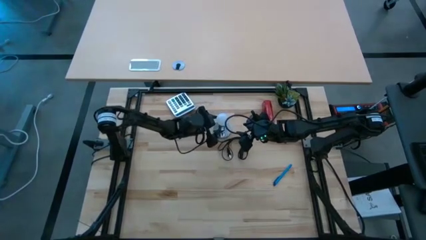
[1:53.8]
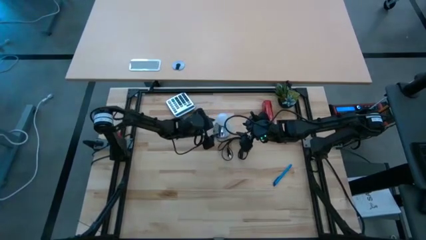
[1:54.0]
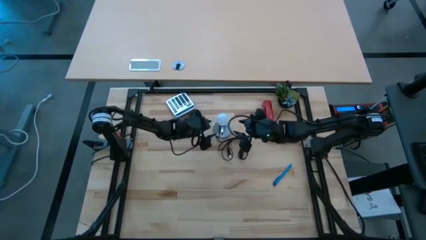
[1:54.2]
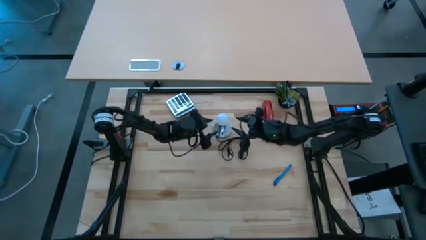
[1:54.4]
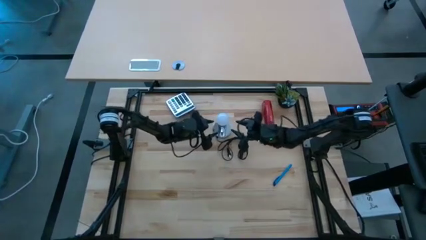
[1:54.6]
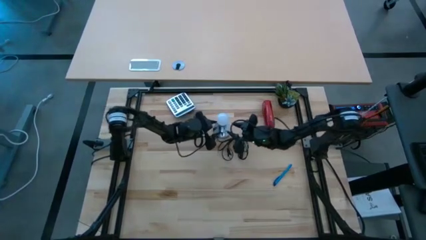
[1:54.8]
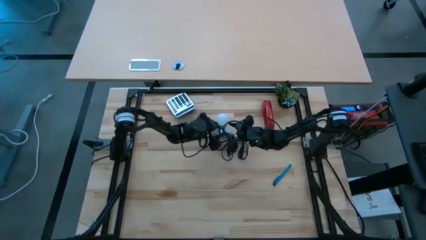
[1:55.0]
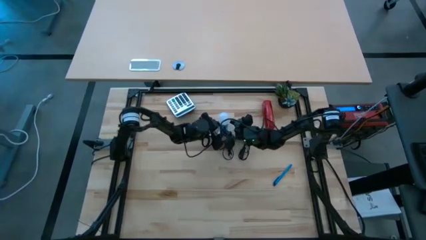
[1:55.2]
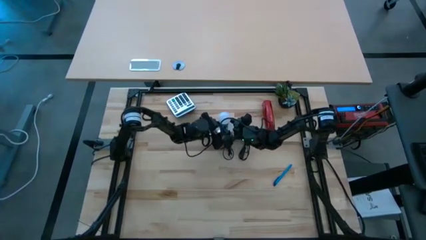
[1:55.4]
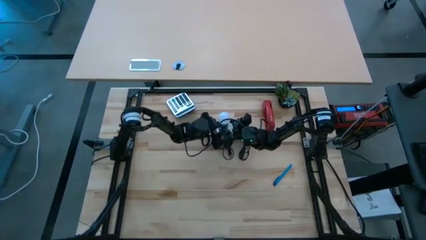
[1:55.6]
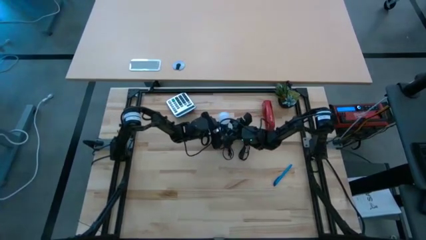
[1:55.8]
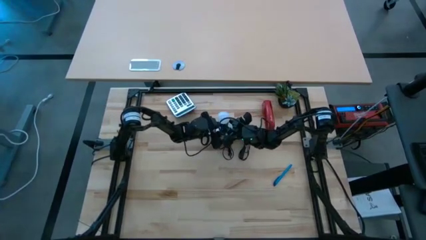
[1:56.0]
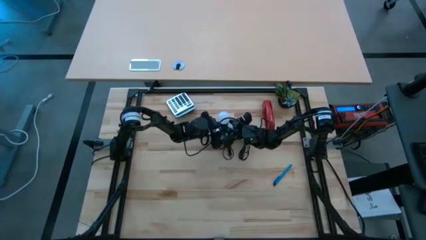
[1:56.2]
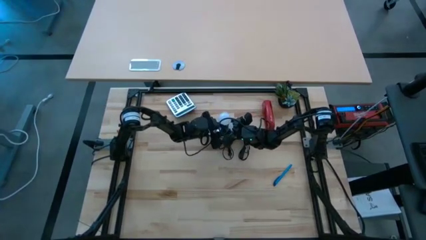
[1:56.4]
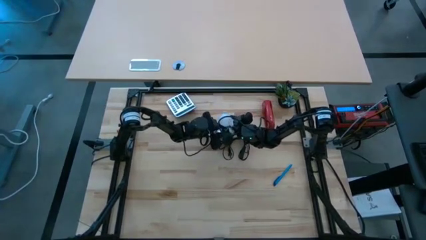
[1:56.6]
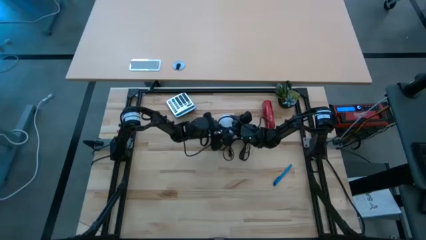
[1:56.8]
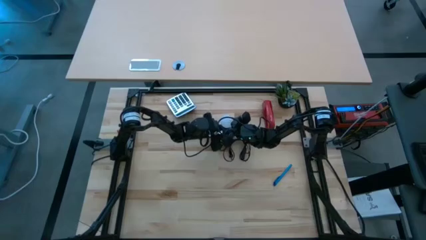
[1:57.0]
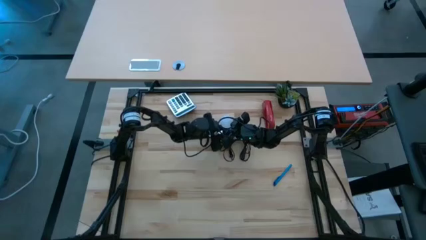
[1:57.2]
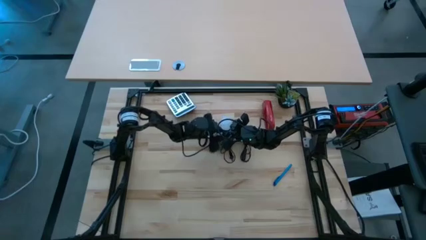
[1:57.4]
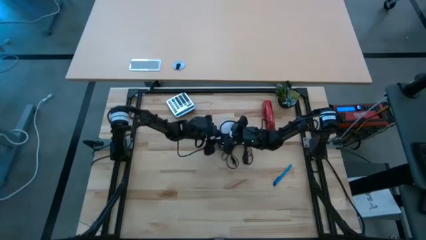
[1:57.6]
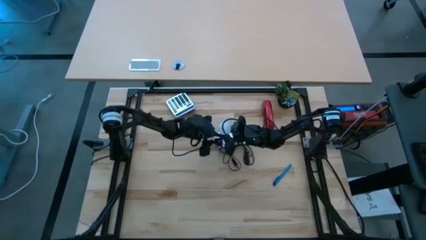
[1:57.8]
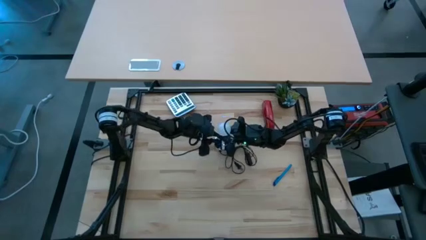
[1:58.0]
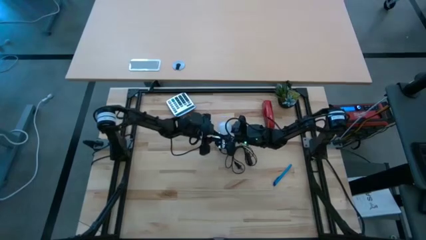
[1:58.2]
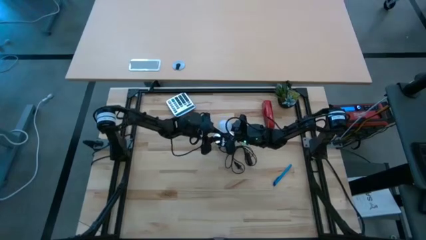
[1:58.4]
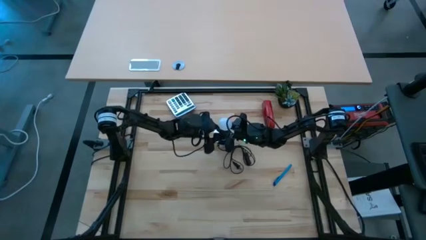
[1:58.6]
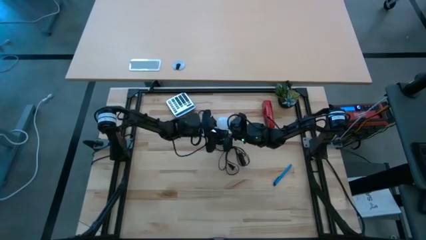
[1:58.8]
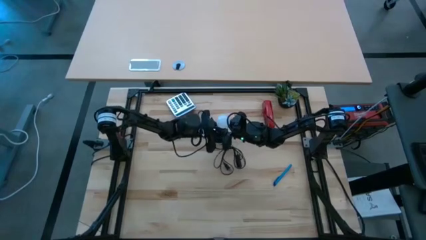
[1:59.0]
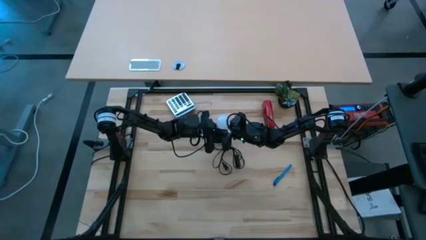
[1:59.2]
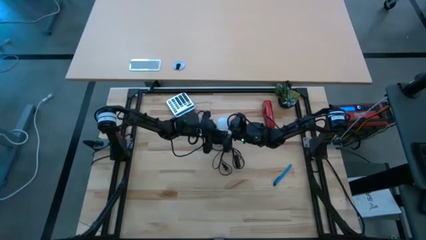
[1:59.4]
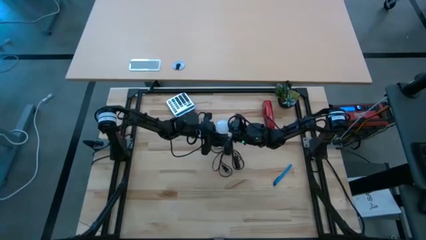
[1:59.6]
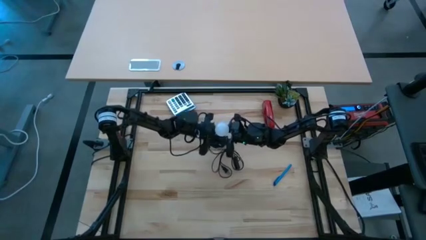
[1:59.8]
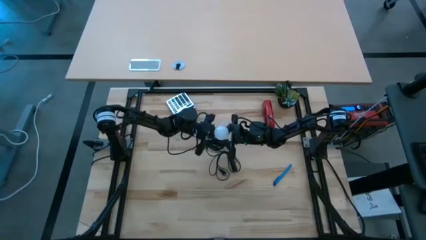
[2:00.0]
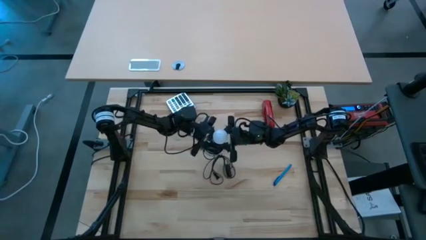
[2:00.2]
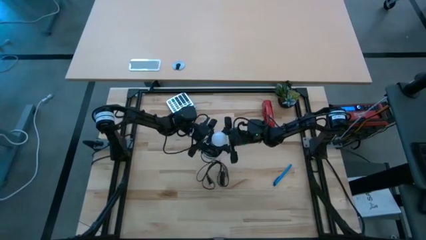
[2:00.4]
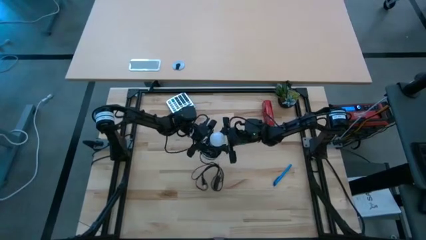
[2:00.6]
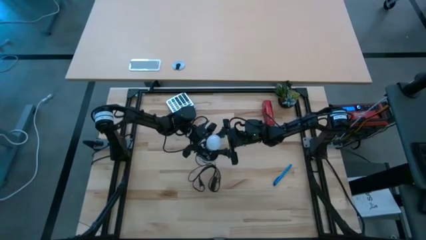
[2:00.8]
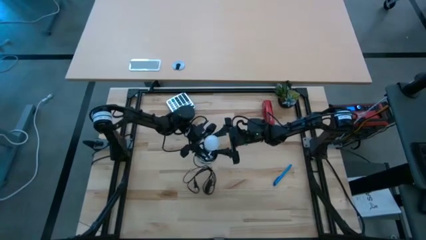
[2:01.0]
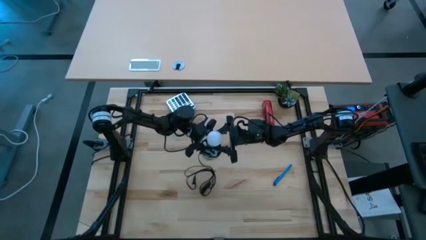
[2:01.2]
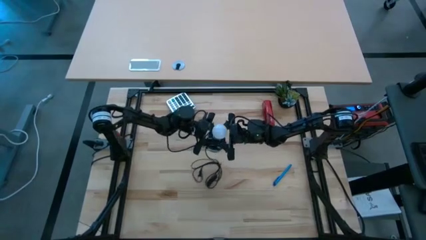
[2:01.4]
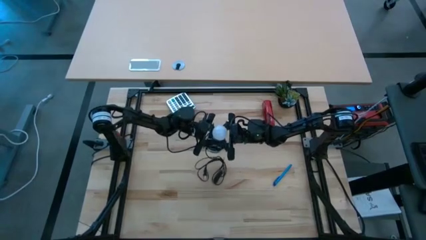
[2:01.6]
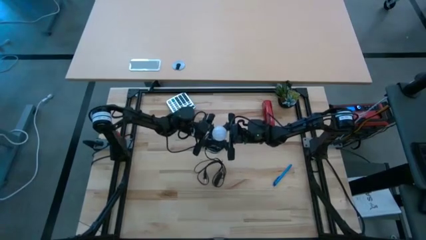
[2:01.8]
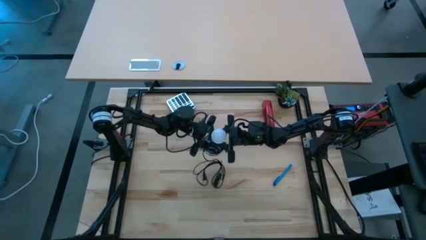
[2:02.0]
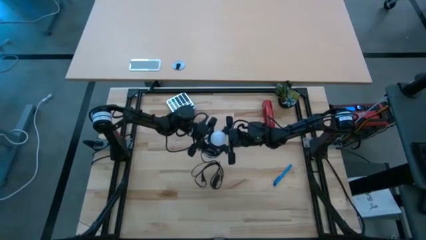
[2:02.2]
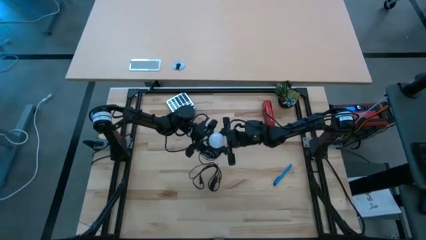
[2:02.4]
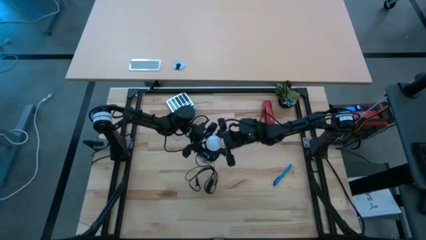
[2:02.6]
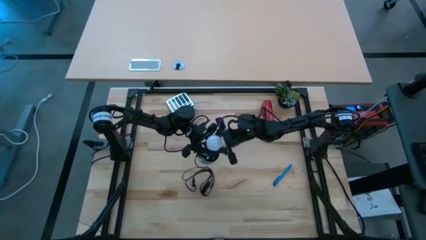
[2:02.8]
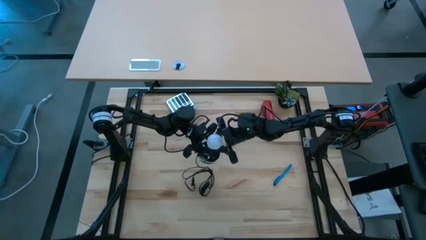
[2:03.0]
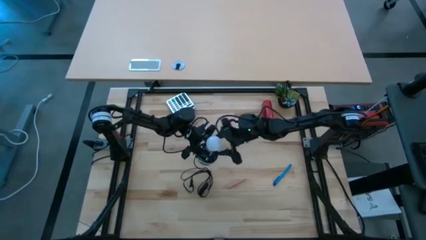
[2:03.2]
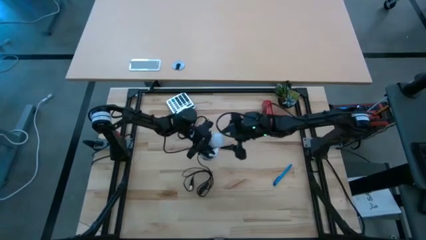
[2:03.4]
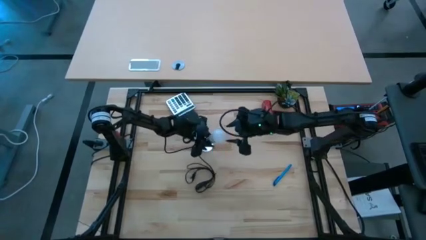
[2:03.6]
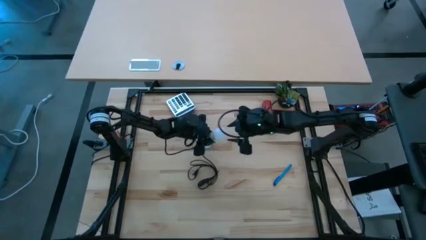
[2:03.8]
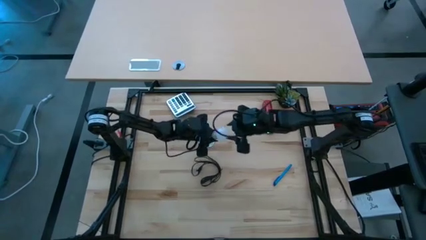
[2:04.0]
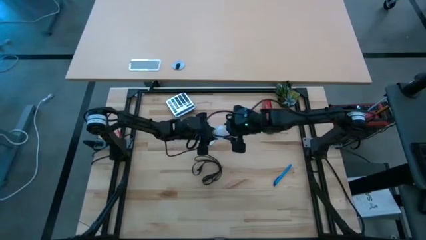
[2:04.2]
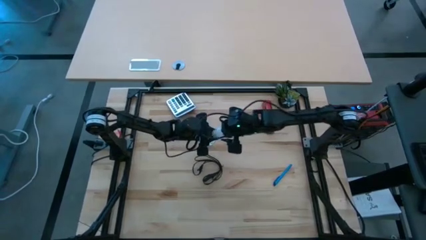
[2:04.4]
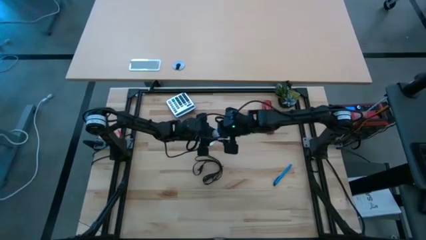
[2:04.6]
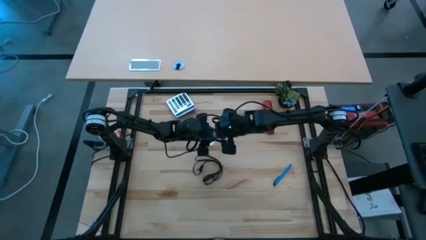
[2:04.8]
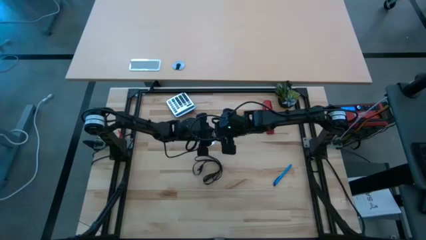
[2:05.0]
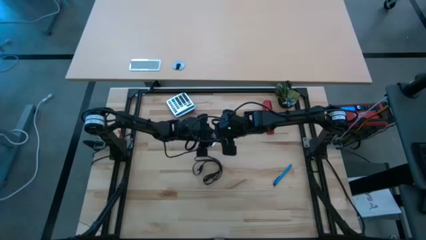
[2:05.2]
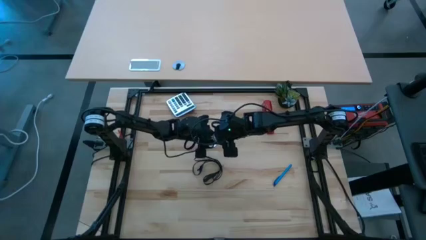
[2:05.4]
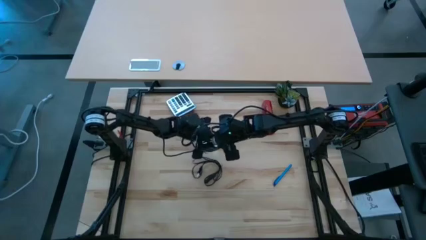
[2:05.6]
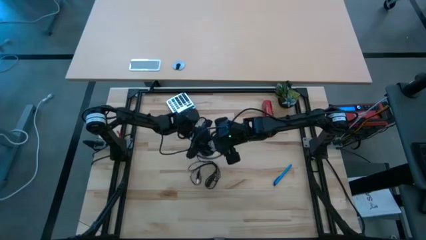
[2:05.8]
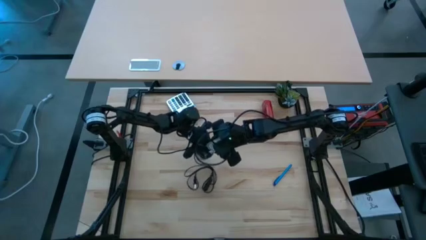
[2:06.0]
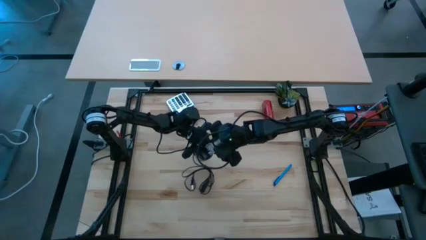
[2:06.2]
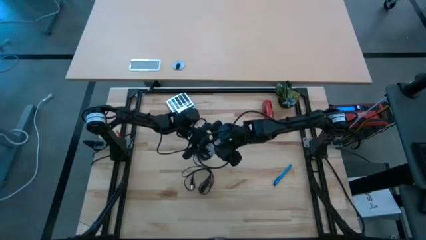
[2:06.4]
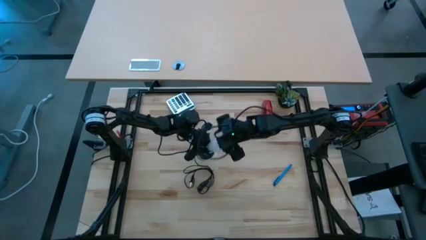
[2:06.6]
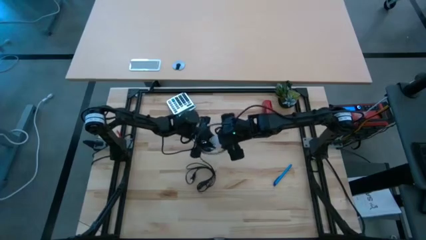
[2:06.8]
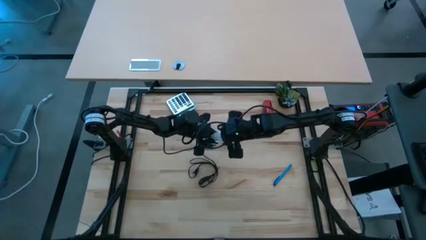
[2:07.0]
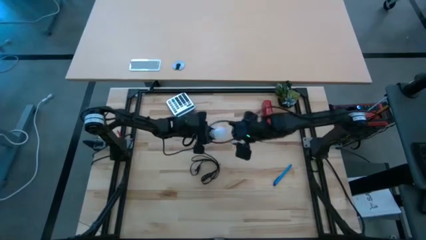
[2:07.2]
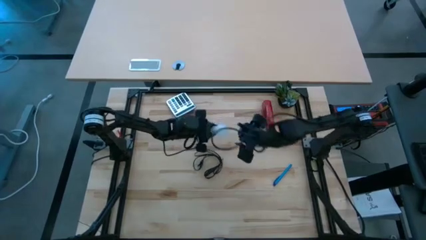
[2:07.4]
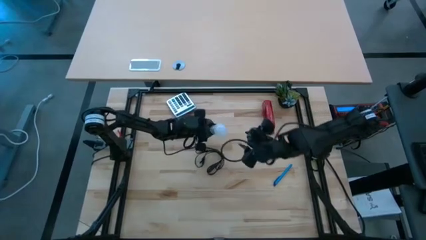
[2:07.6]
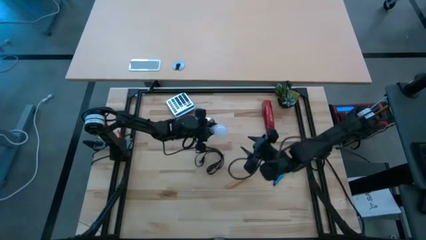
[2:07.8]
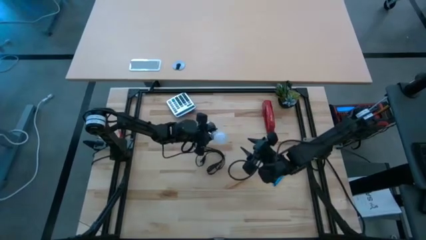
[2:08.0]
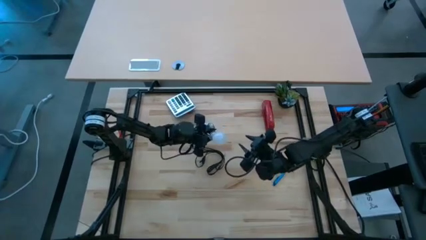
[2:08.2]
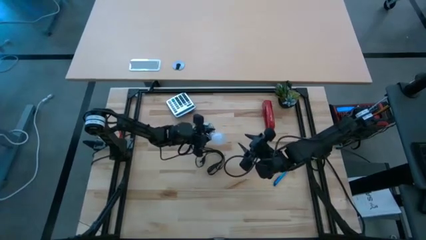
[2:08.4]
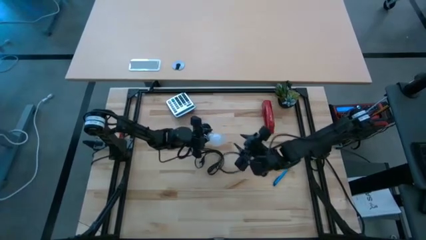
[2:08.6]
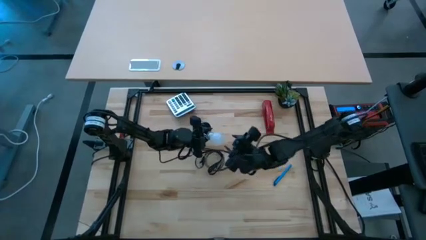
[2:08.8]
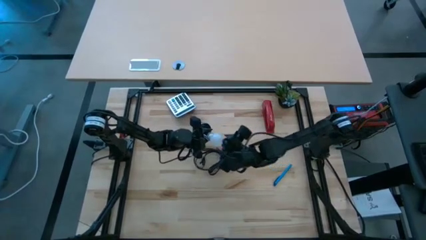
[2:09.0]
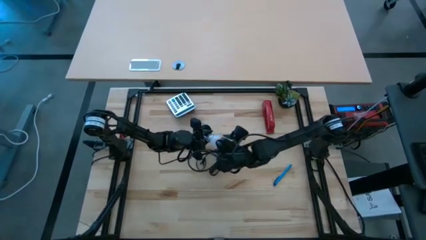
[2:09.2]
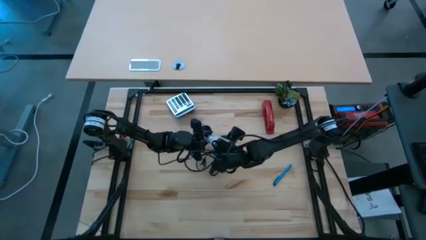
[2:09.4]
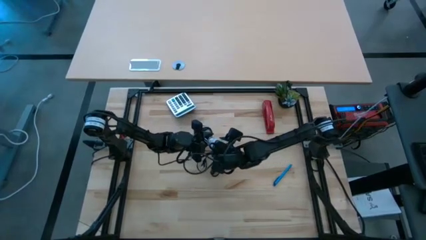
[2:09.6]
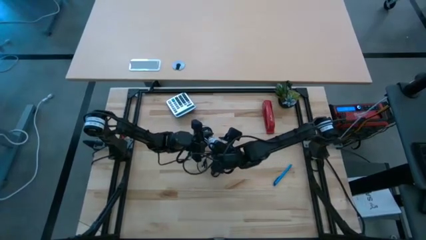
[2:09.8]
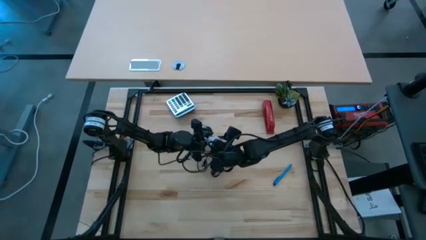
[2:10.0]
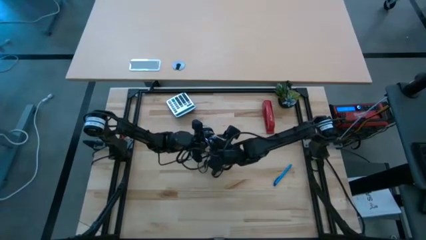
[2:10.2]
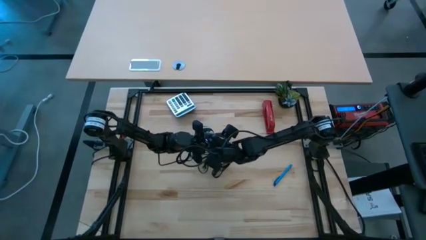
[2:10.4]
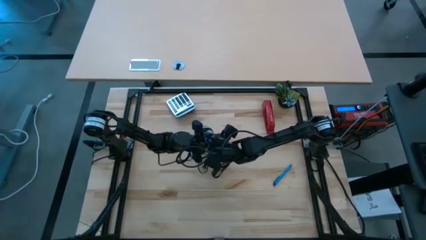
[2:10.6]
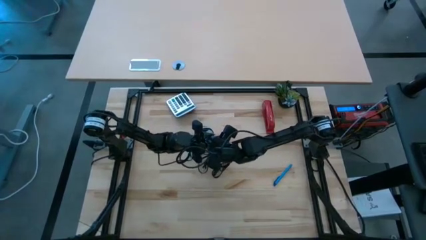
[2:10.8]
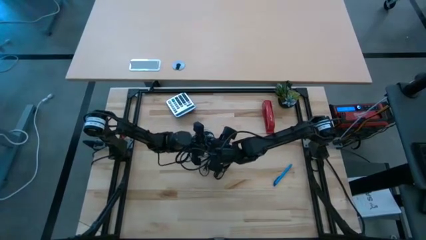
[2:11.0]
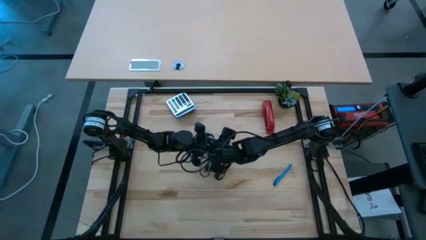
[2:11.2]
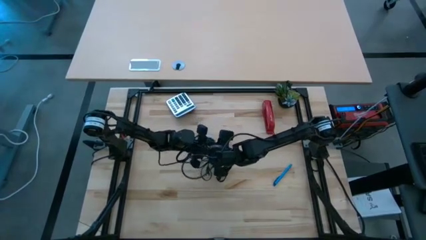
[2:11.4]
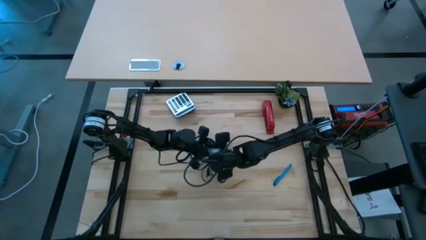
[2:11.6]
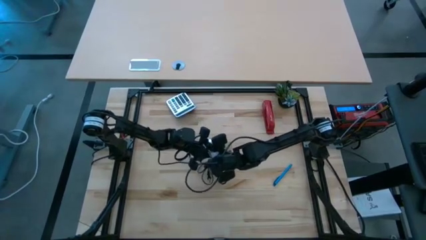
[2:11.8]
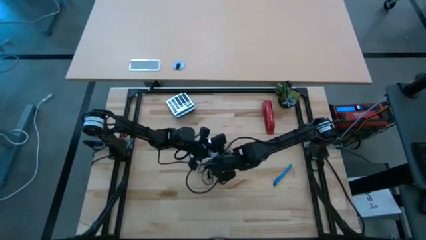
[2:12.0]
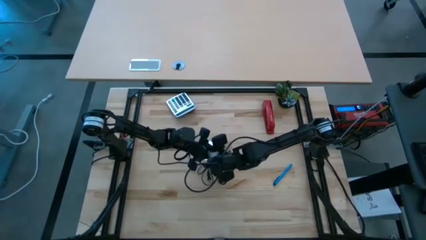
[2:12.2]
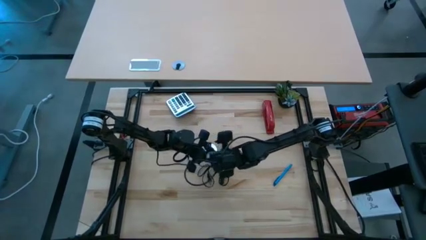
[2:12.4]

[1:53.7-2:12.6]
Task: Screw lightbulb
Remove the white lightbulb from the silver lamp
